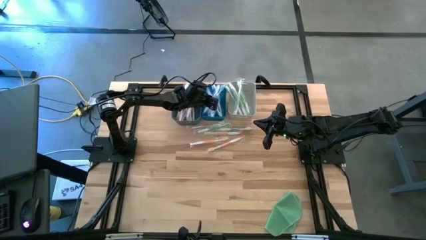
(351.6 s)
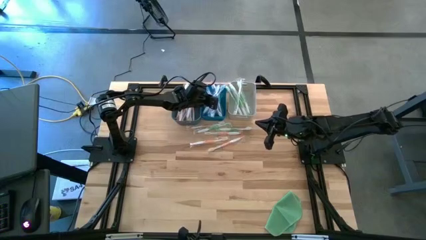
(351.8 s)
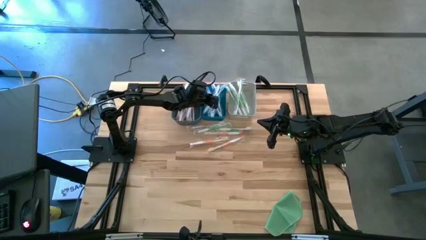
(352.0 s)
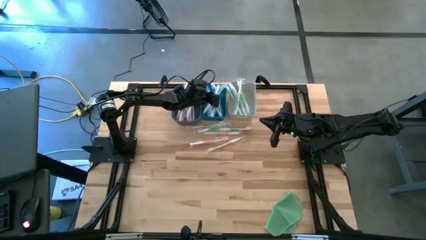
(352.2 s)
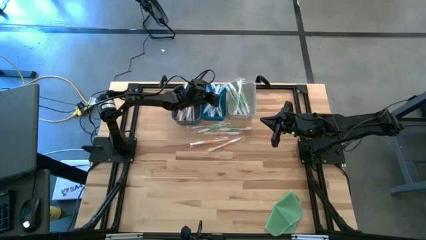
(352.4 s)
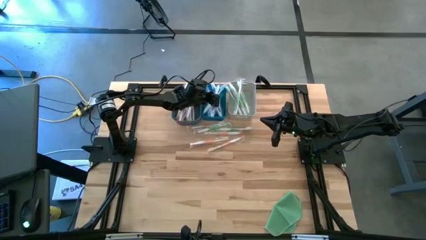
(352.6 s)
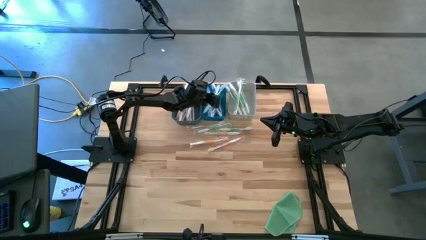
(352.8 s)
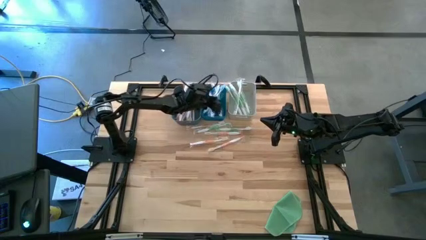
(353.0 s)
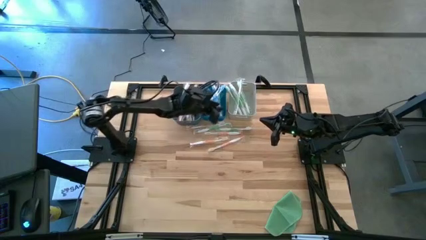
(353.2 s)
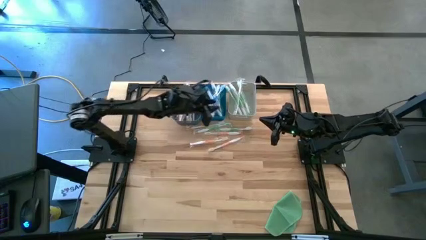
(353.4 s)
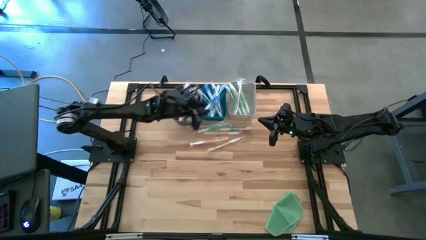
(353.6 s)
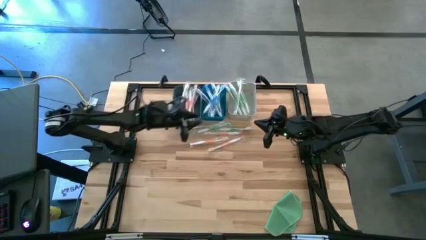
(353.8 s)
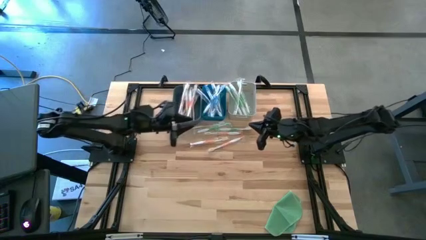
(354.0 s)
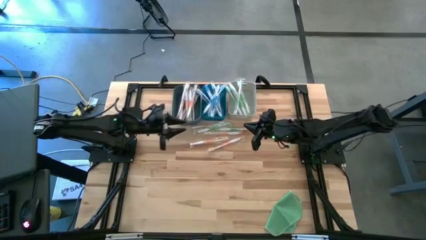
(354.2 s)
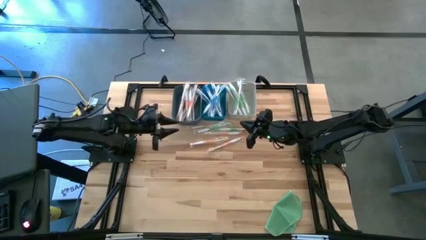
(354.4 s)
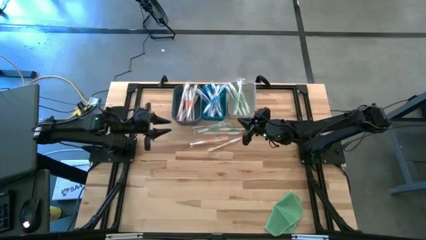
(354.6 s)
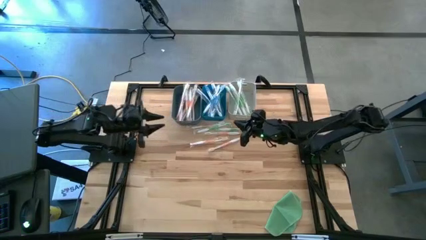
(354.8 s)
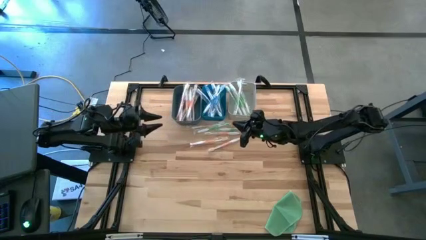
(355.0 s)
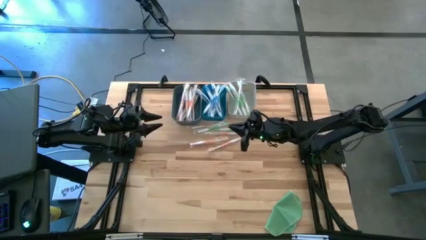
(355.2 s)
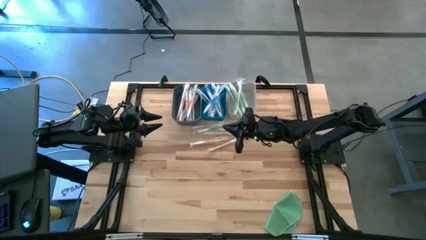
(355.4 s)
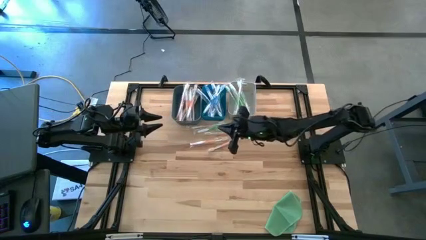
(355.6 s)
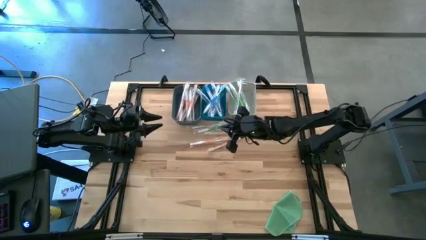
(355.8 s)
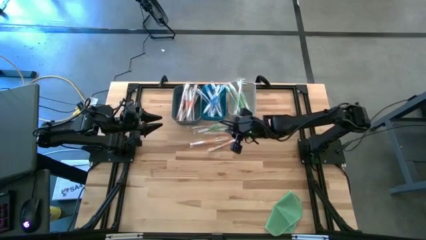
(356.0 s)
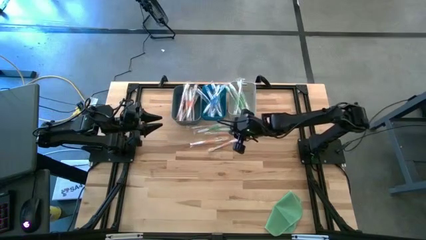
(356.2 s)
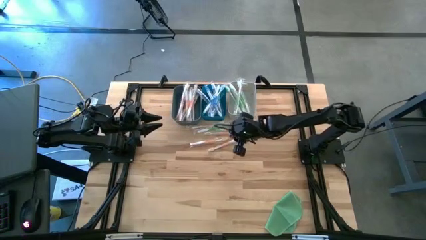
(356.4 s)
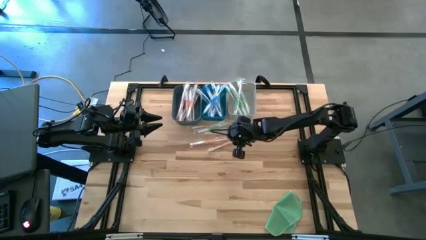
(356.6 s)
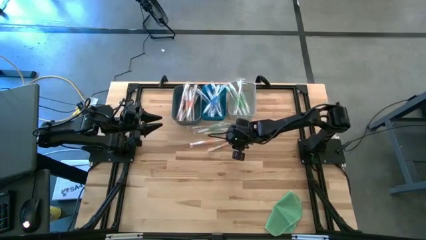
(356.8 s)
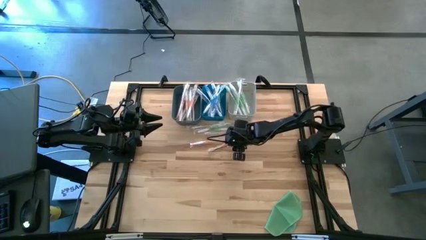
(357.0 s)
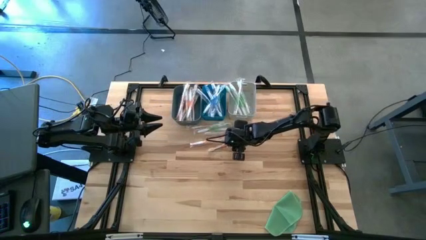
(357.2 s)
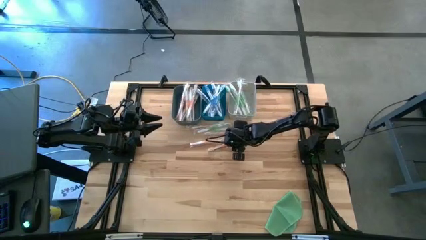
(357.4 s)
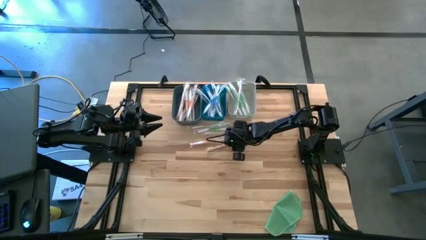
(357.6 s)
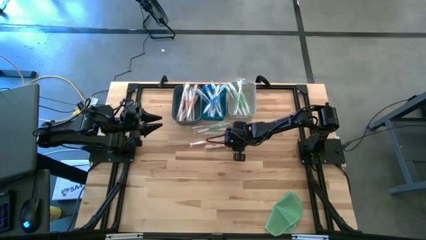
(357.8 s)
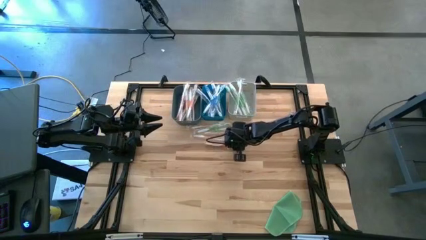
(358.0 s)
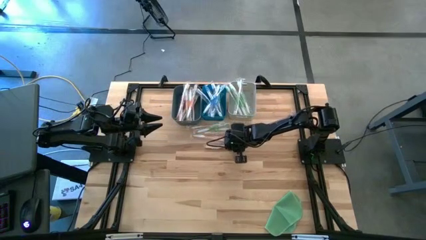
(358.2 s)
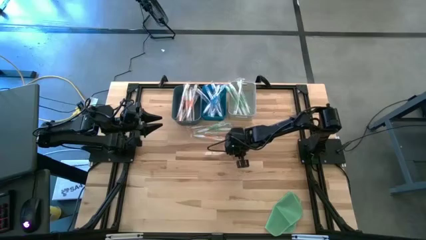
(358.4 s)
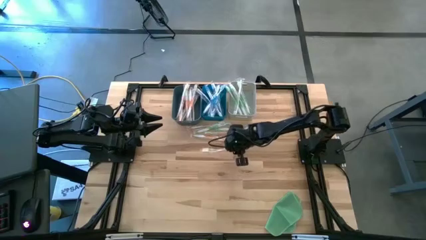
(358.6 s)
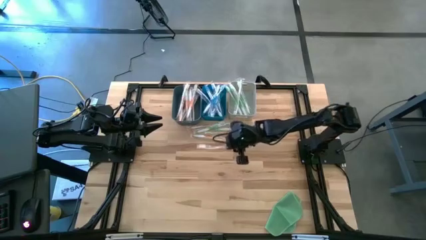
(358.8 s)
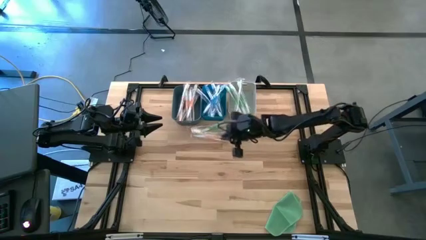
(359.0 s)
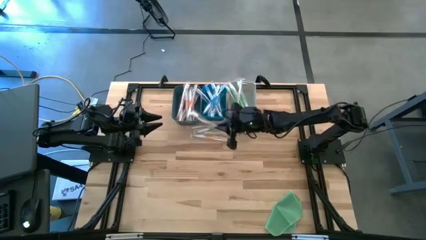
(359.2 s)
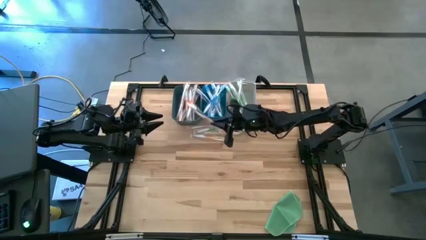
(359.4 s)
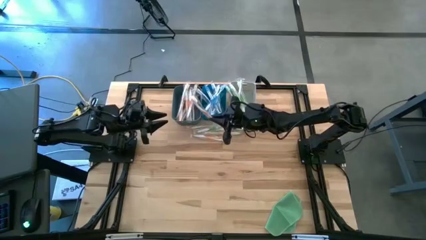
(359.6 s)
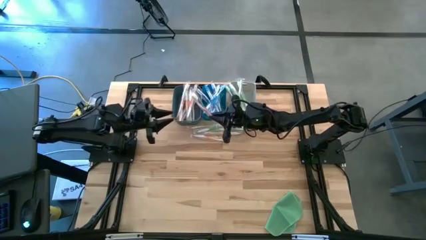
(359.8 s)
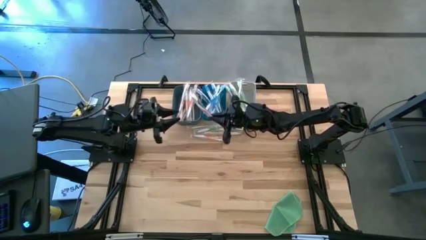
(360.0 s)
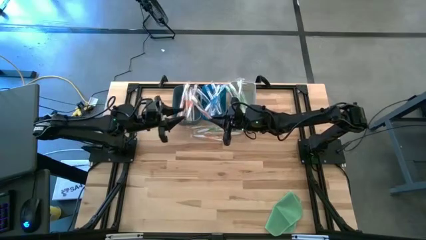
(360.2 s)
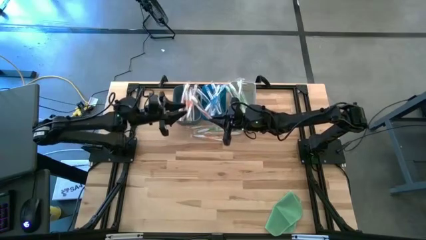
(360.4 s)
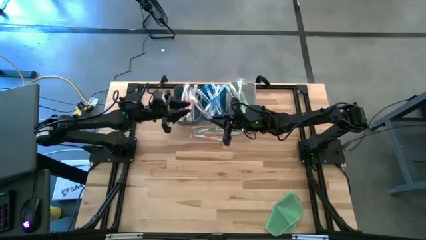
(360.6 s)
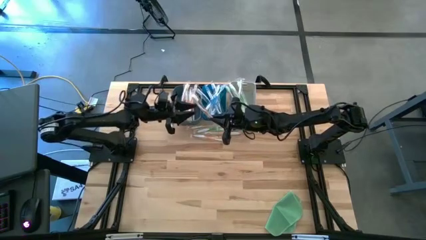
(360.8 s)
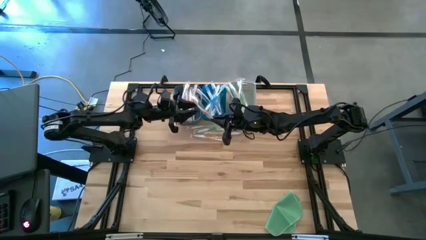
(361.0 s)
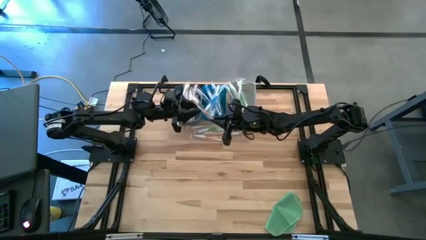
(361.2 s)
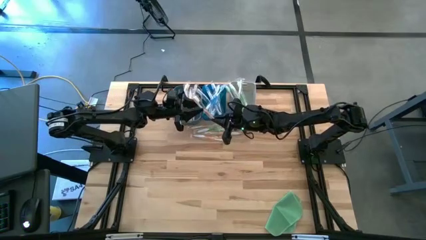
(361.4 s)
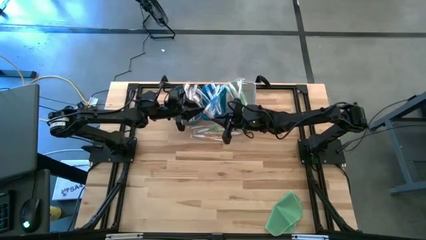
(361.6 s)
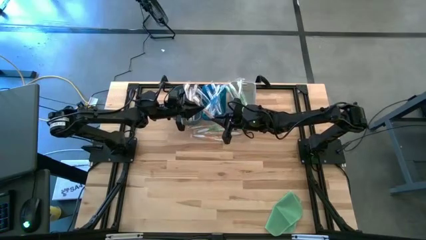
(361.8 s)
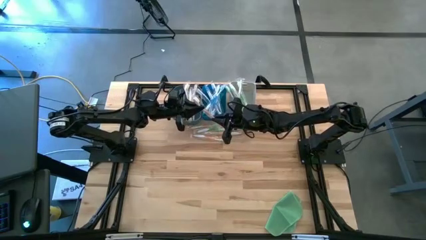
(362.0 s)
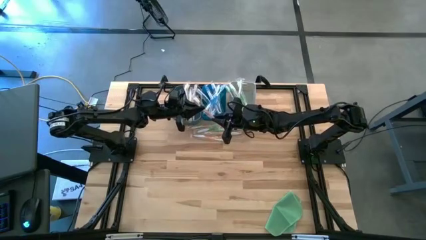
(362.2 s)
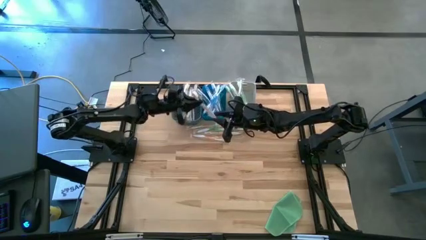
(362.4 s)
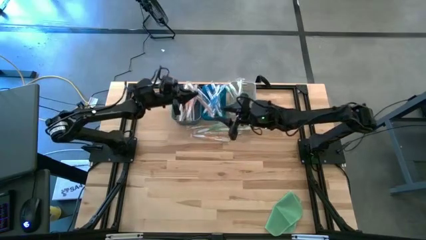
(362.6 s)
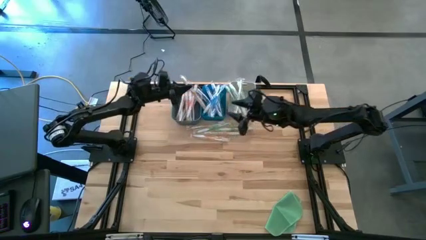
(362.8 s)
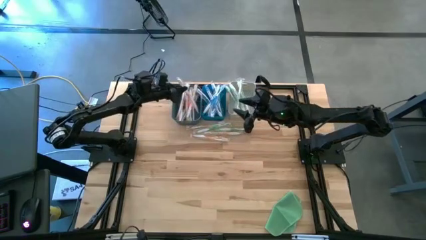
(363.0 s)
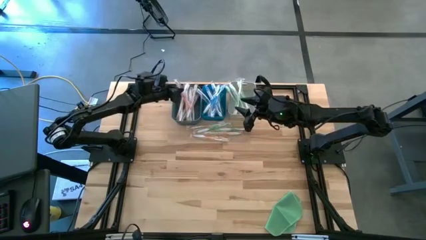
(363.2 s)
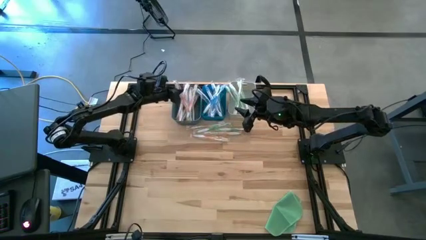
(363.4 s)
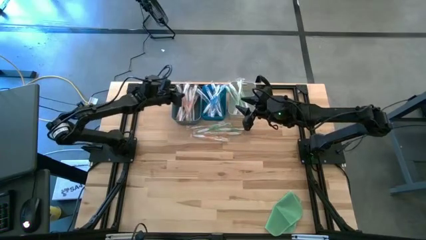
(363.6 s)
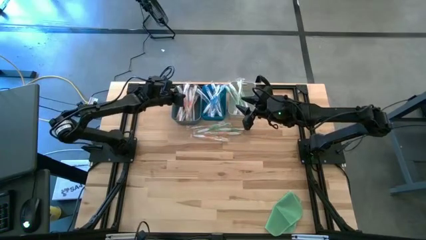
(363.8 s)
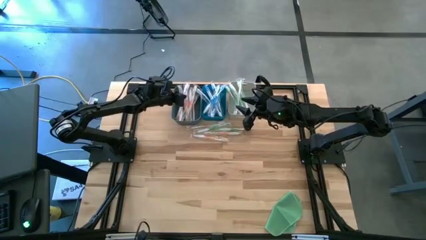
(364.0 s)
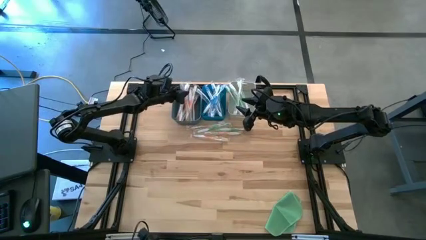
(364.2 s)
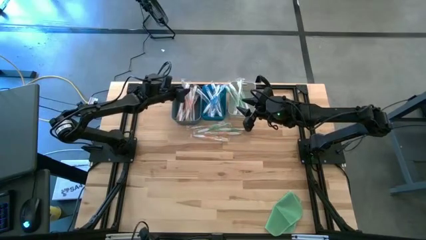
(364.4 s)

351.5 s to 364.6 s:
Task: Pick & Place Toothbrushes
Put the orange toothbrush into the dark blue bin

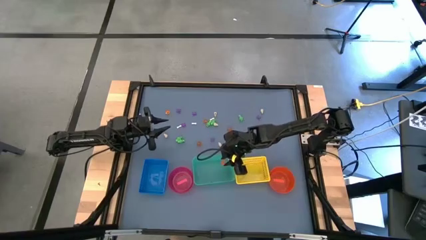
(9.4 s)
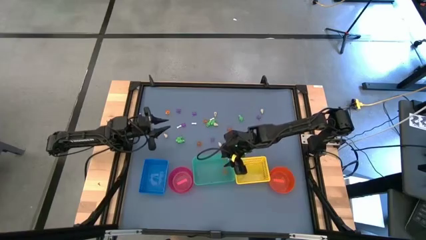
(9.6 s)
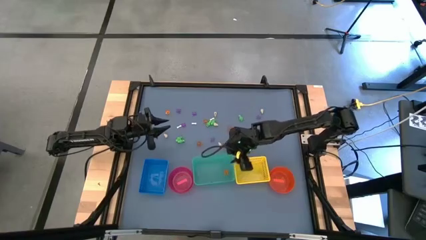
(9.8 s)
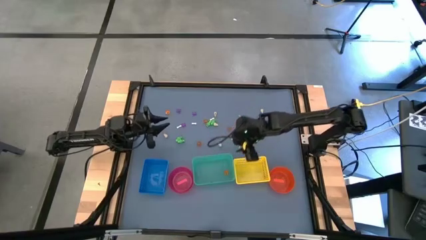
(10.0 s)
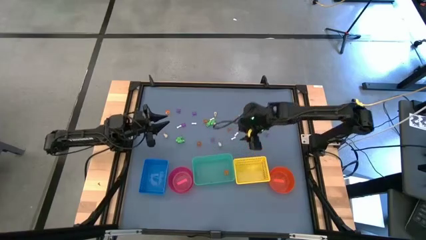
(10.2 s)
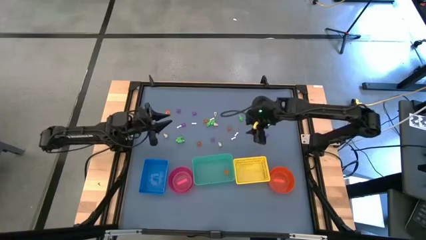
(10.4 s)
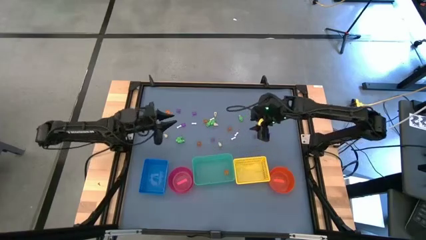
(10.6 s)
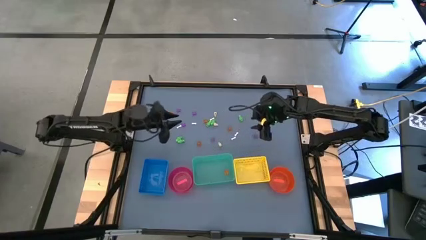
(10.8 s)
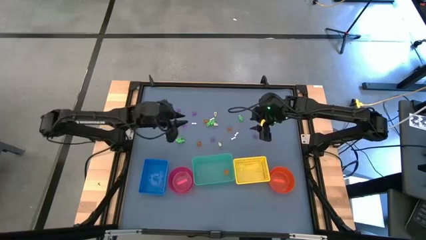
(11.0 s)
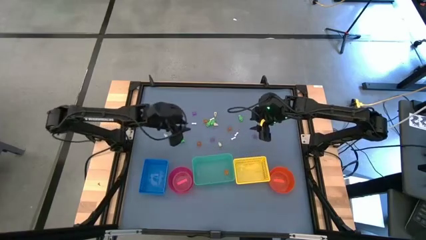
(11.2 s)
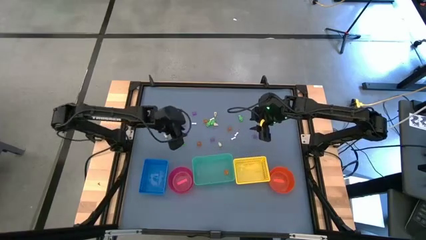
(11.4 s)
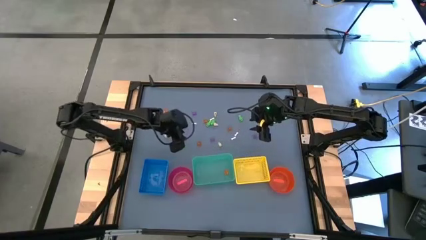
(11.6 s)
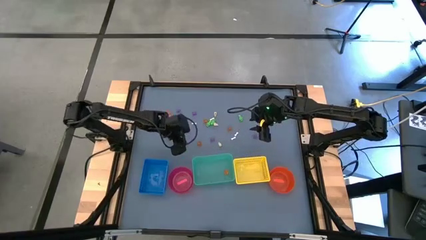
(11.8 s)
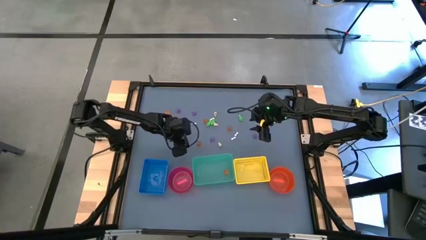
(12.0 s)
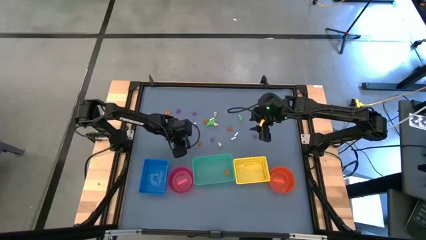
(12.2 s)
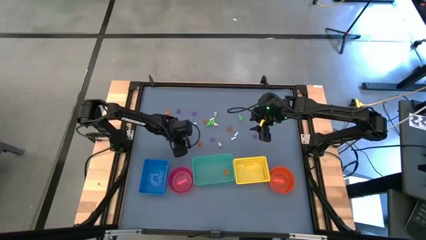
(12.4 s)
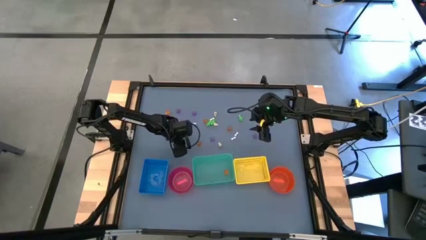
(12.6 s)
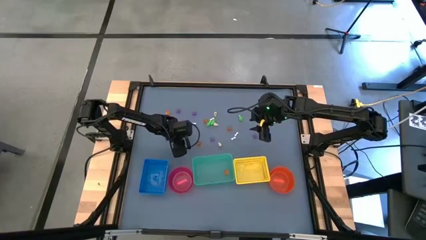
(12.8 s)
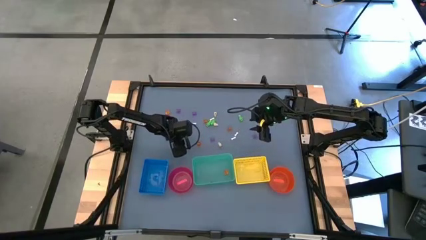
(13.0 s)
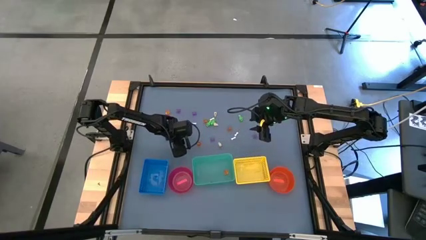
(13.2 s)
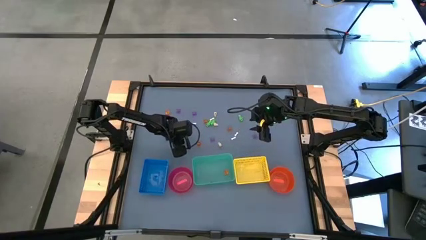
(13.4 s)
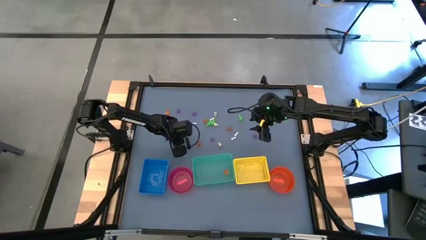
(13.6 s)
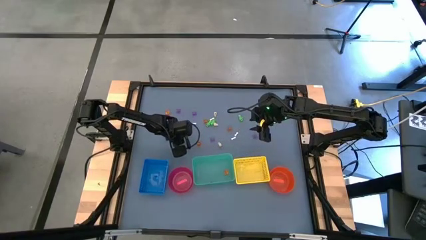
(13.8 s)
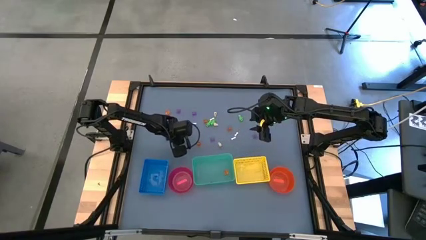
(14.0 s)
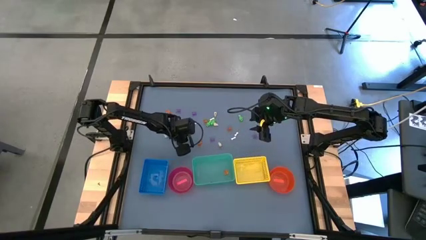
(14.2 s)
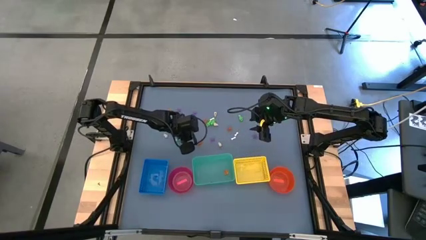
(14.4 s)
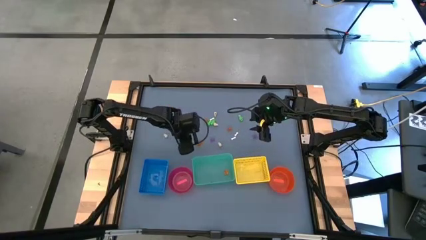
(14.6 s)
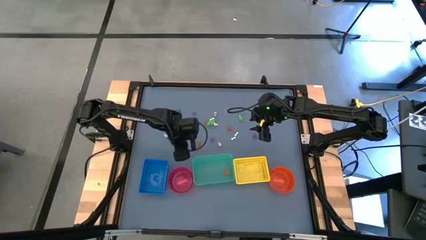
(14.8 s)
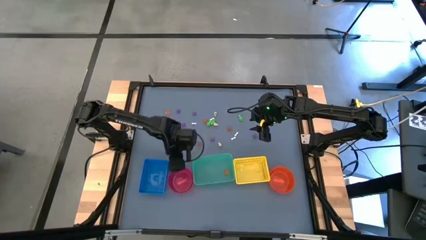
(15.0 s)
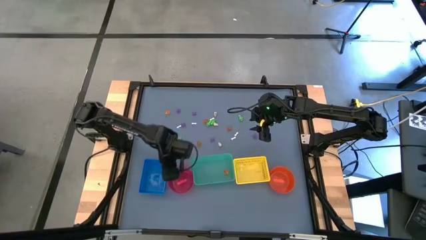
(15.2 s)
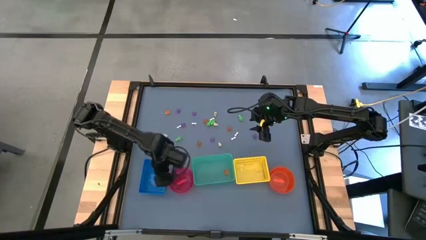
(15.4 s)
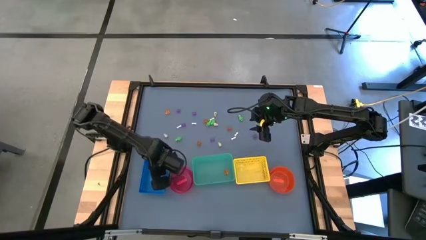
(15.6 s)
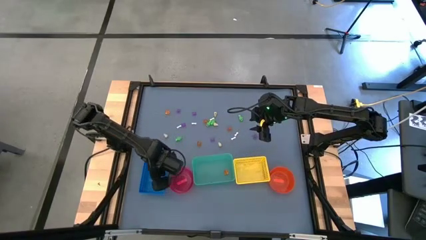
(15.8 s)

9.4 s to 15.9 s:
Task: Sort Halloween decoration
Put the green skeleton toy into the blue bin
